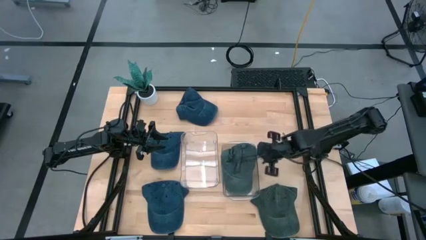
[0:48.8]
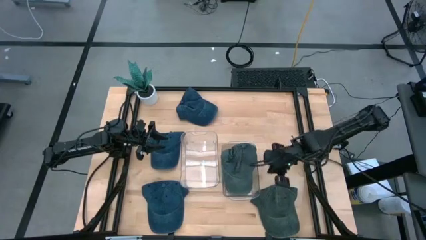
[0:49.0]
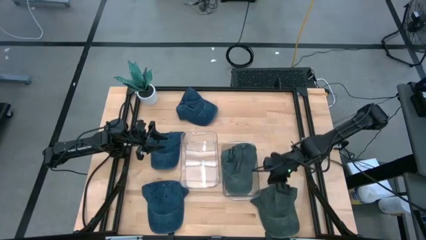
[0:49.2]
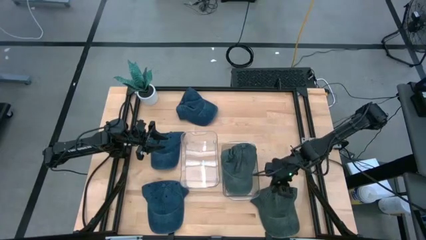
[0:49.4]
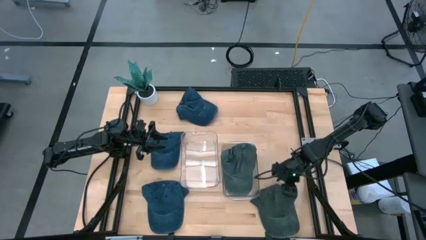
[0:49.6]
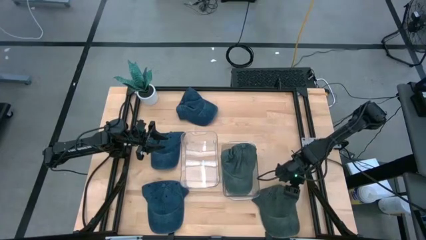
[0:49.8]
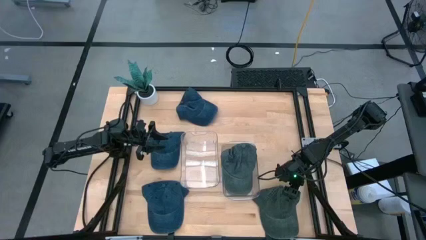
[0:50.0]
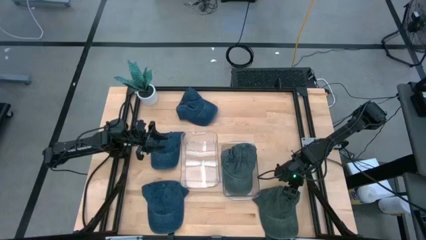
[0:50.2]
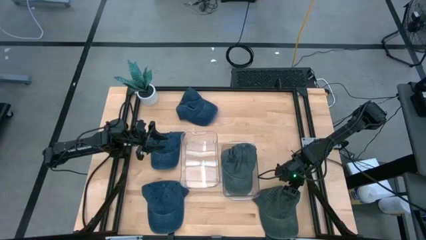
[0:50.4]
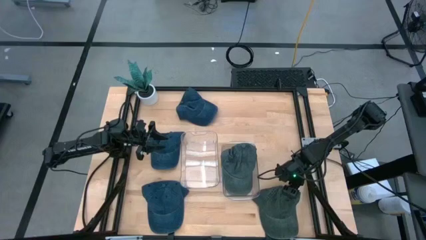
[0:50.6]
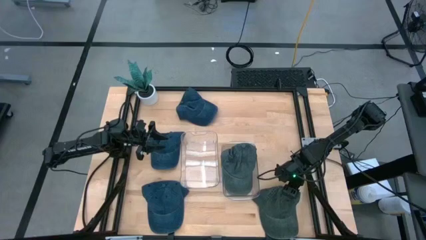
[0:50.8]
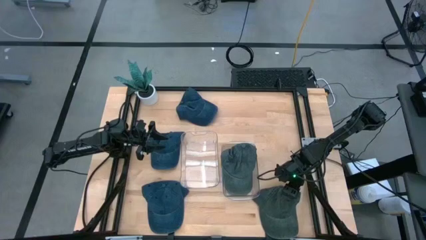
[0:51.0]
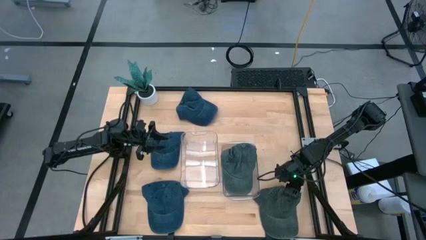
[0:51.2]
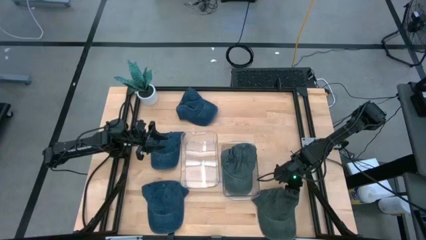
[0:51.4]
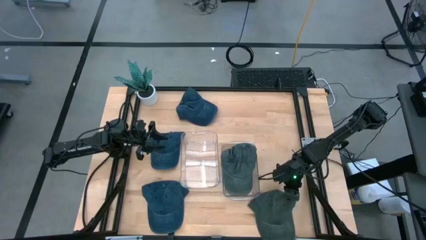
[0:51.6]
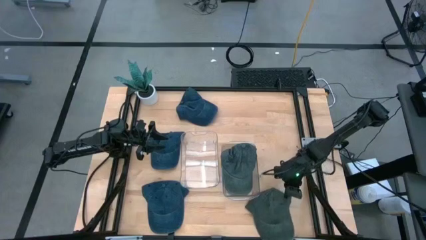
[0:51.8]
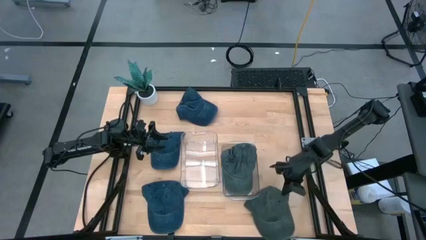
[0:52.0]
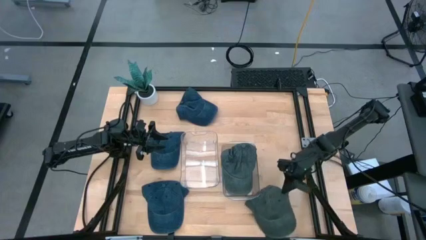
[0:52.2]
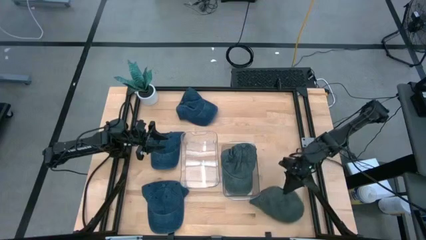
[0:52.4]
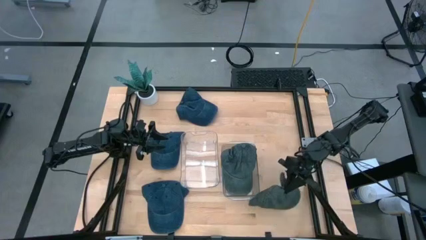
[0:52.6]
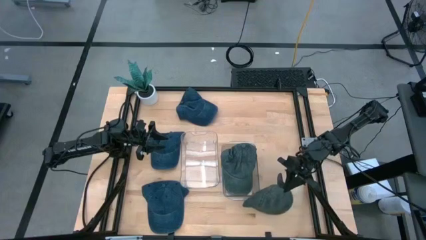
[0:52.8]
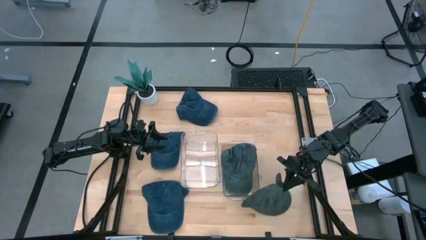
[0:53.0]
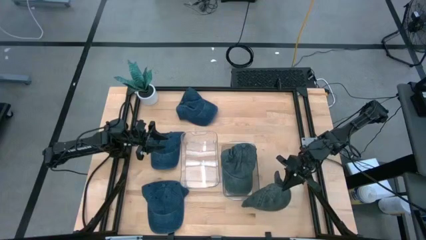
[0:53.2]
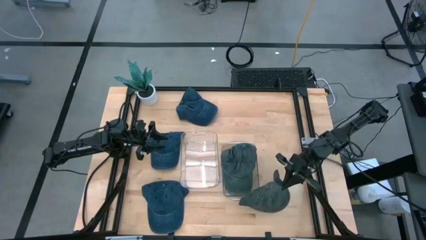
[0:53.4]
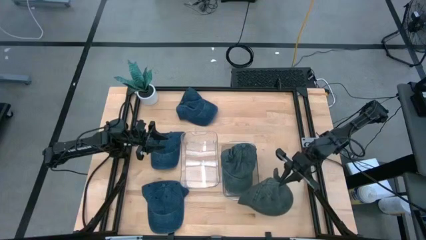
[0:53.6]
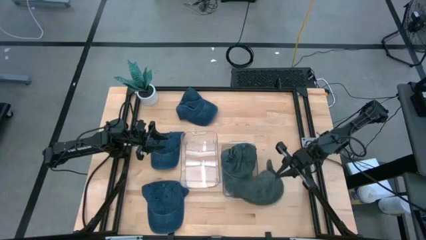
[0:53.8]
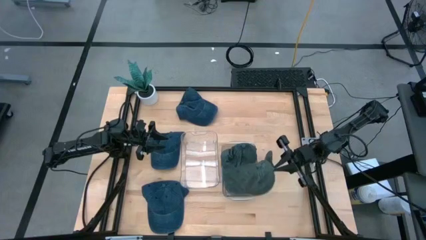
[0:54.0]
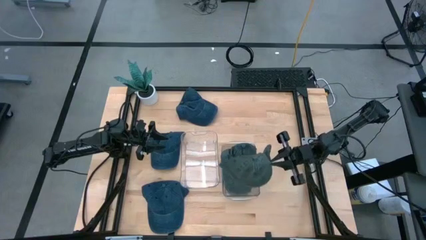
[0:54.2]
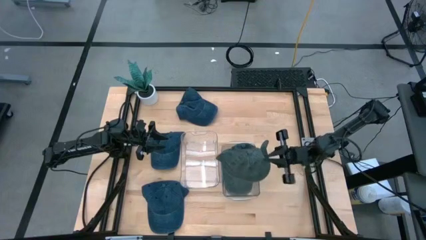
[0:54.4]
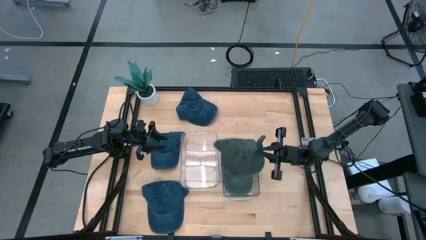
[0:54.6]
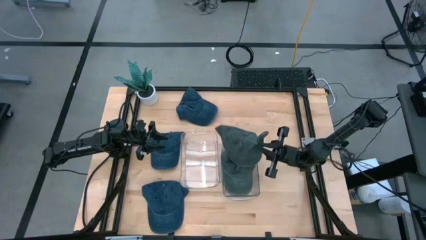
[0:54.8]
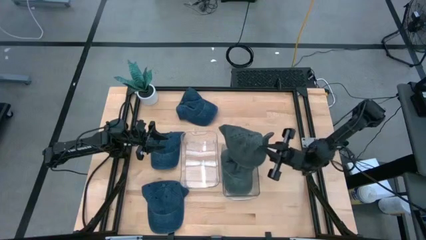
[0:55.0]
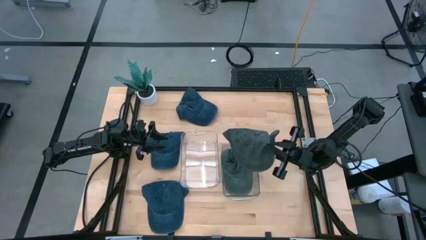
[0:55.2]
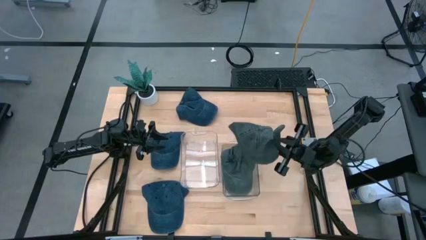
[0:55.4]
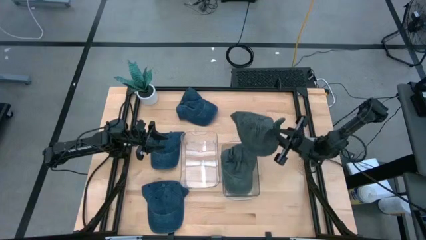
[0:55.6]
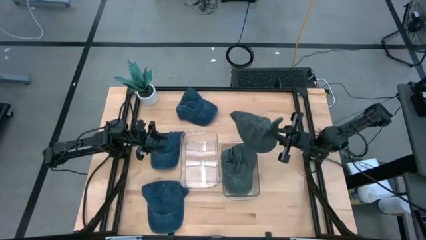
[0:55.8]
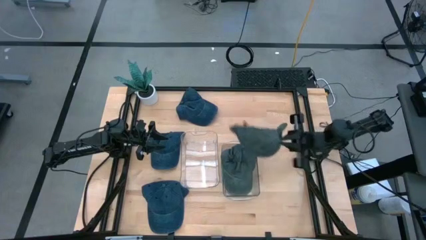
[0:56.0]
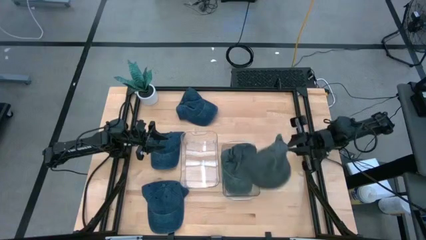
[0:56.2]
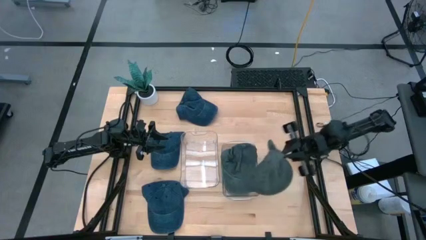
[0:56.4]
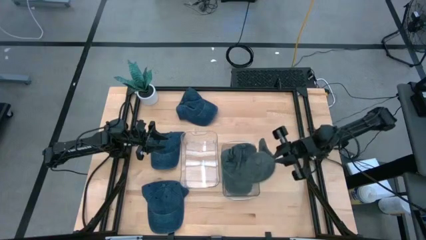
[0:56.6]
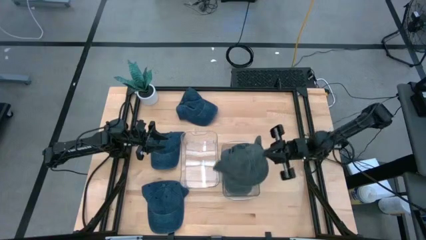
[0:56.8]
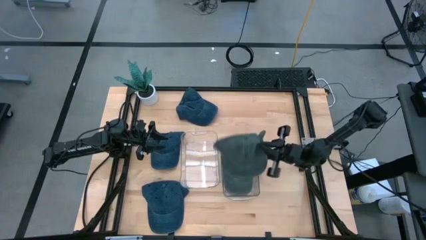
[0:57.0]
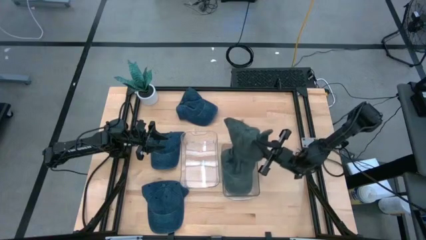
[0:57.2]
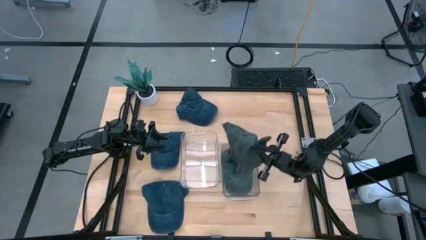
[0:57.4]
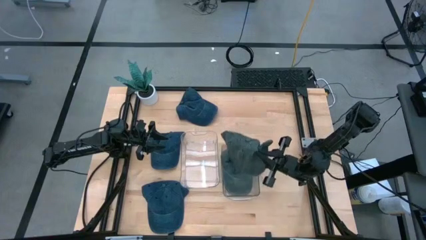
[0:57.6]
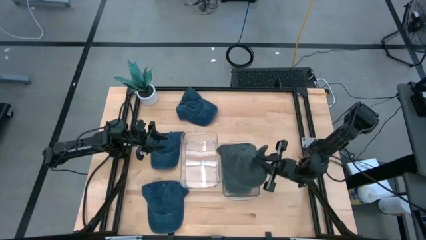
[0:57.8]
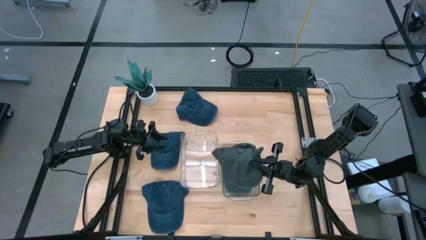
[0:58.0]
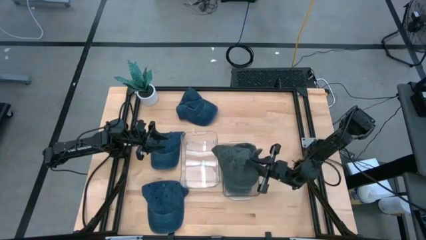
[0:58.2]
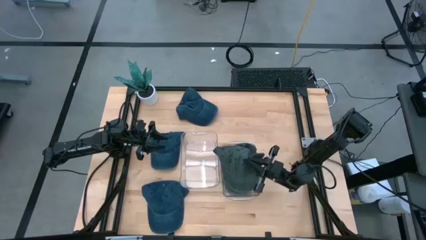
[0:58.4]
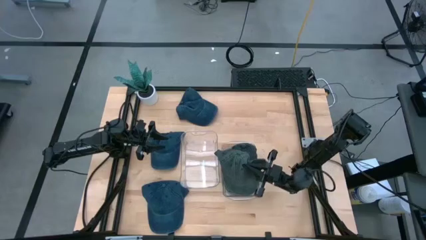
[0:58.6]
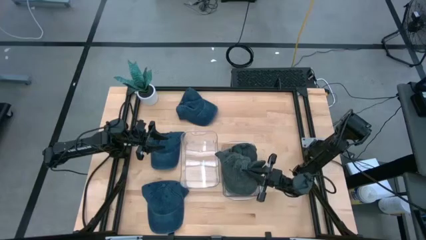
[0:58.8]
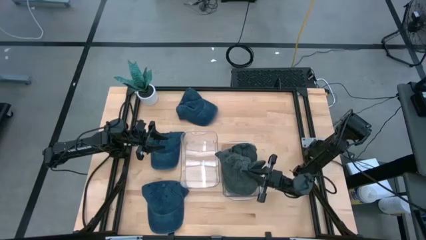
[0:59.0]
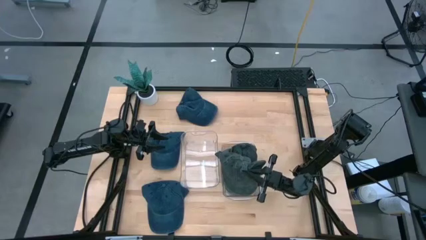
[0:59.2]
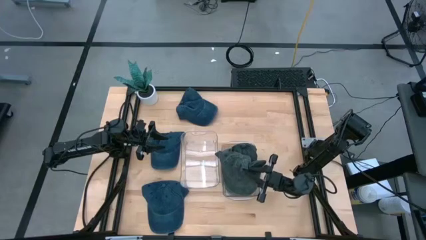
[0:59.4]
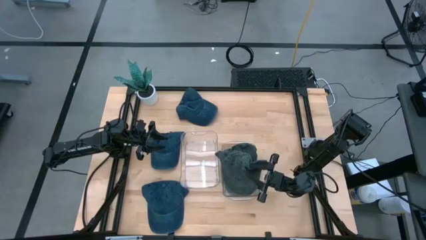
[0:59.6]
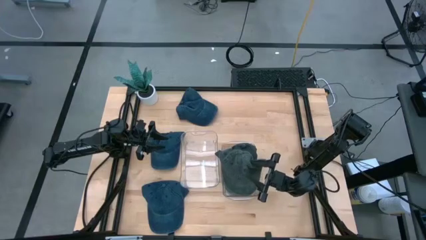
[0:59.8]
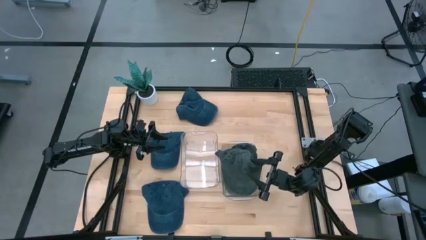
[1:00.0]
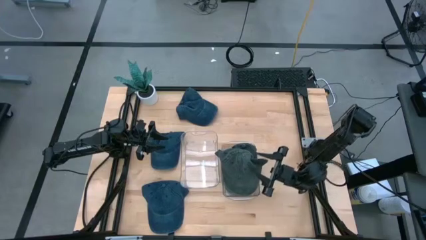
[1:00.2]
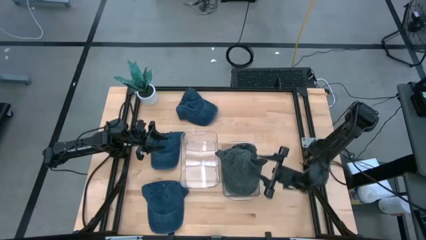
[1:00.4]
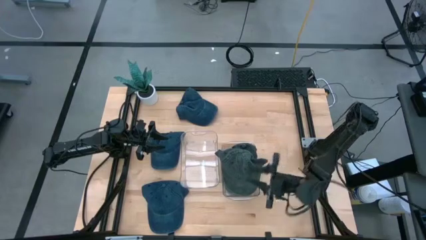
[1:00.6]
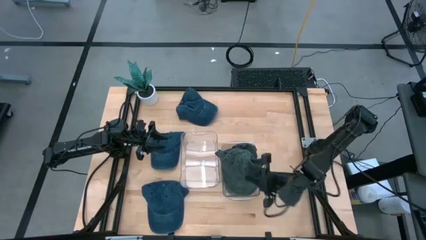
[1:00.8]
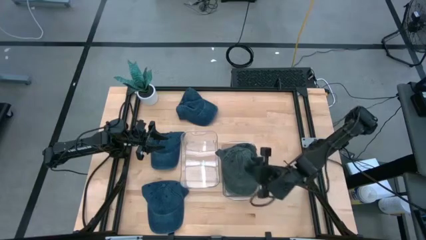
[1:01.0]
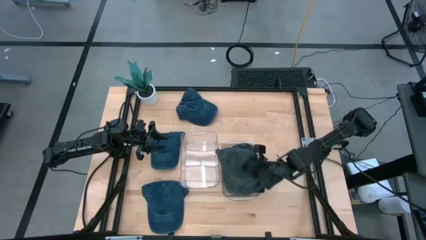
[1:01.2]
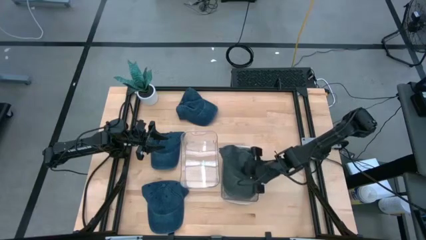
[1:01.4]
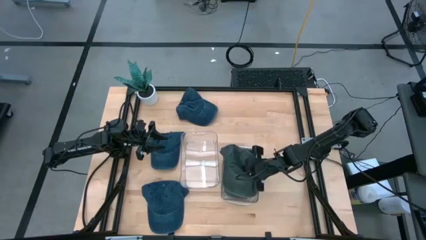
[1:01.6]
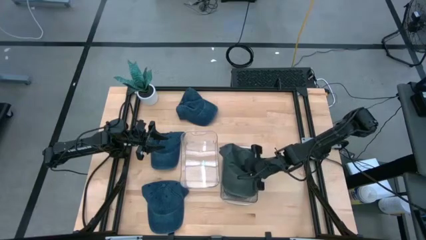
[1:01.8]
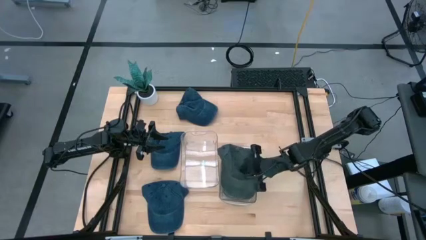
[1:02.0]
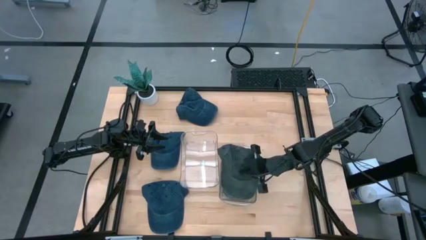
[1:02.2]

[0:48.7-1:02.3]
Task: Pick & Place hat
Put the gray cap into the right transparent bin

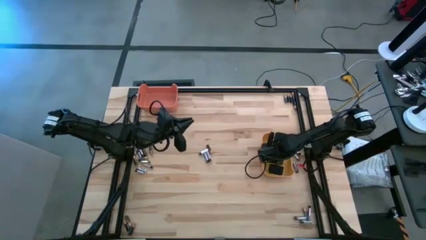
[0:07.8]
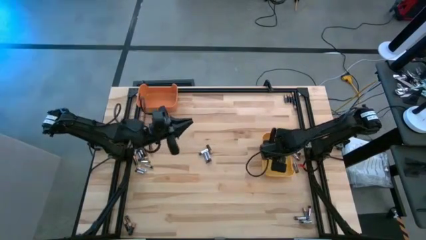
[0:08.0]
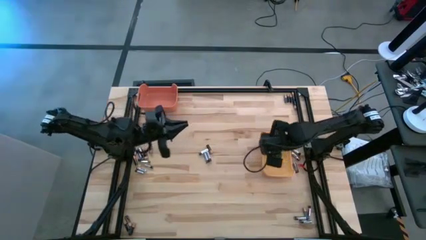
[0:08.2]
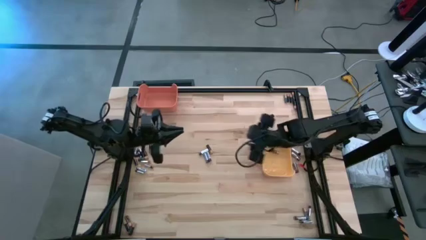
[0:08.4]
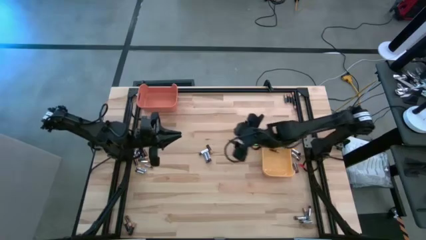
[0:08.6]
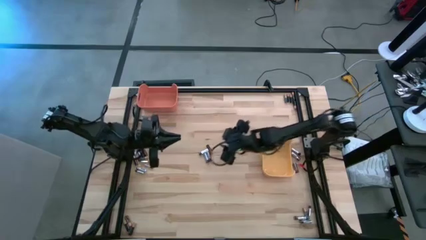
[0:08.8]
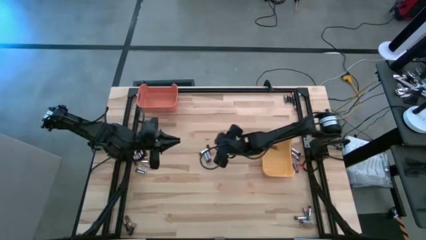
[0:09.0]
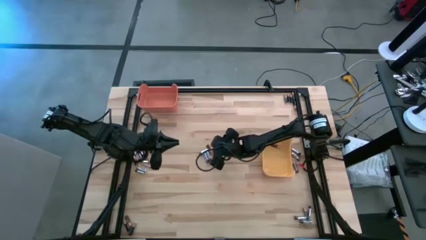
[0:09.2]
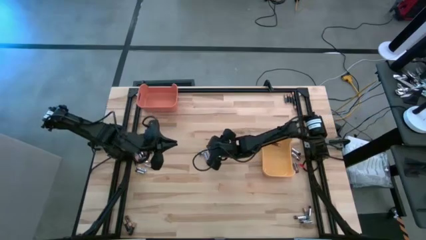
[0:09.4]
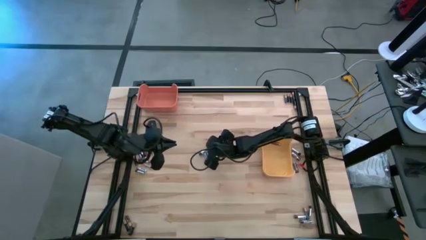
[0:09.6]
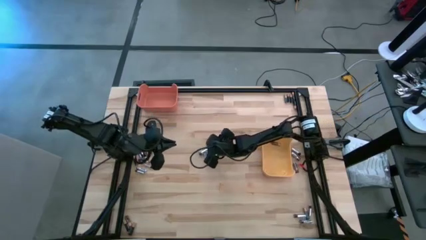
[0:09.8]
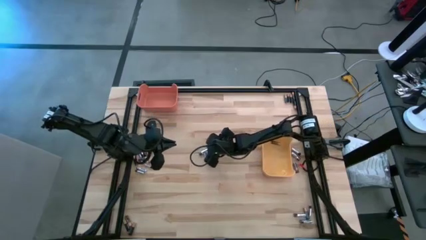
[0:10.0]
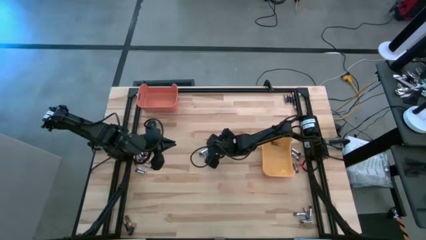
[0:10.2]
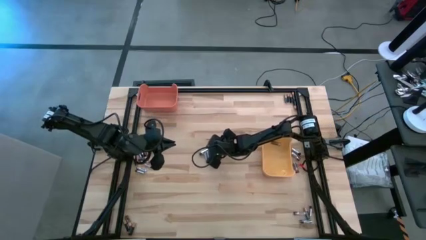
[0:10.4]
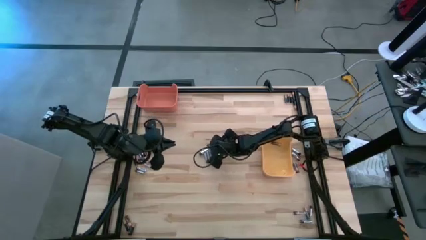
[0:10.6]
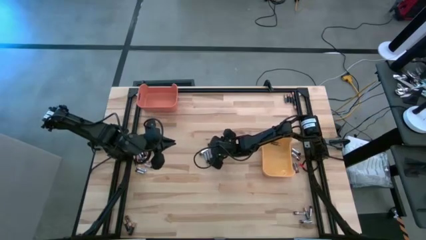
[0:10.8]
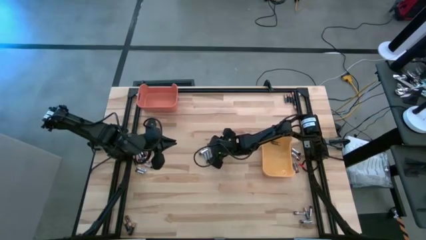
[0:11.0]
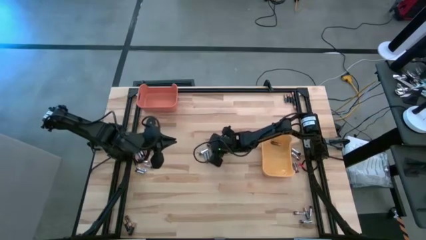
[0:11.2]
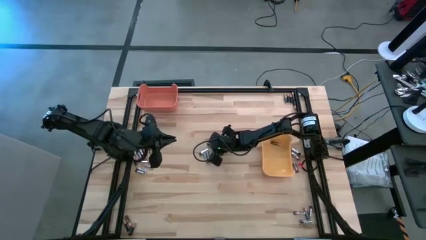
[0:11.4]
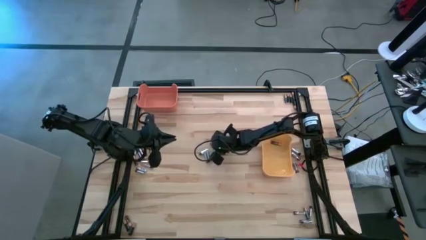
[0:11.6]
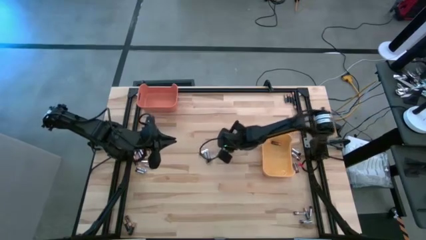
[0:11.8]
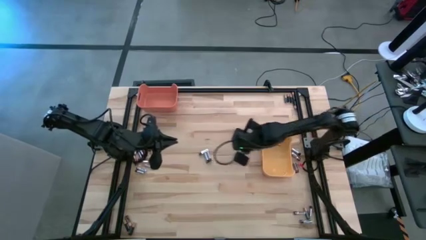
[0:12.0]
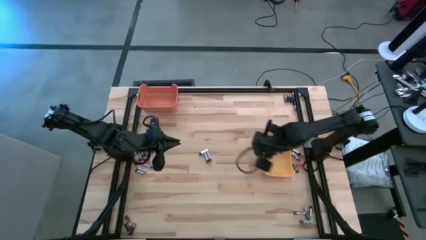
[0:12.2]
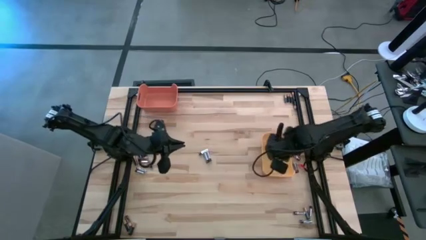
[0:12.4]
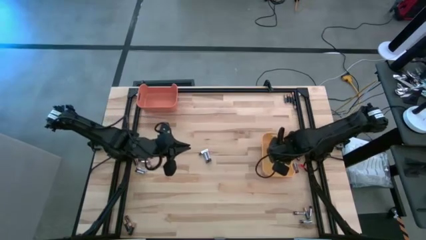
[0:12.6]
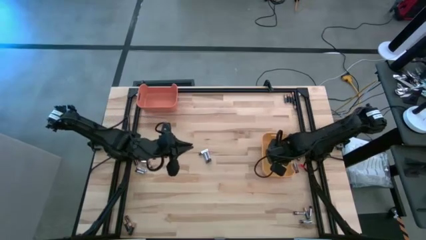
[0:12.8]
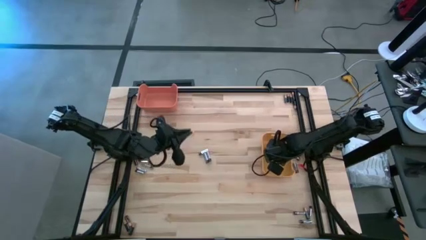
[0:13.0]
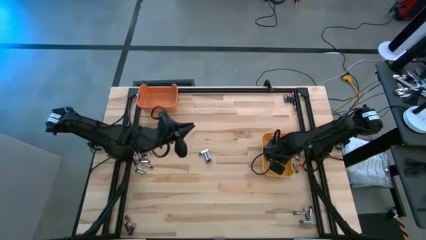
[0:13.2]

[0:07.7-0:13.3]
Task: Sort batteries
Put the black battery into the yellow bin
